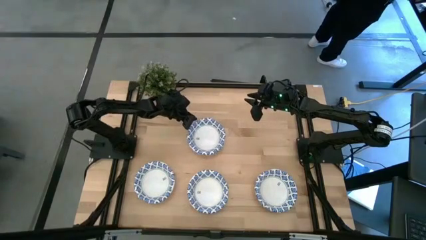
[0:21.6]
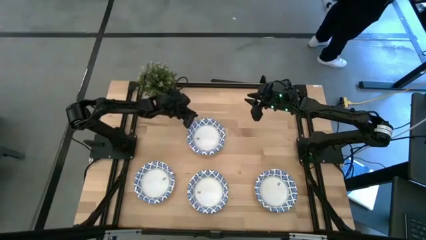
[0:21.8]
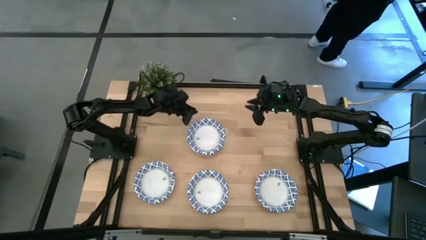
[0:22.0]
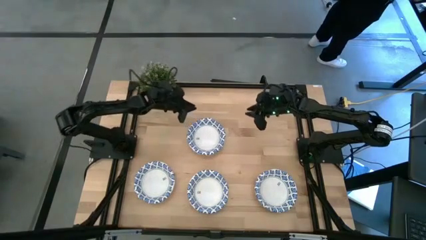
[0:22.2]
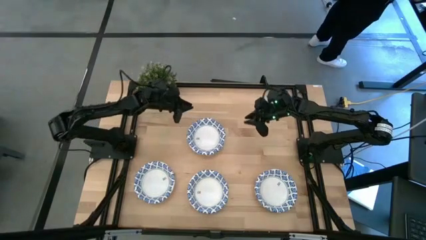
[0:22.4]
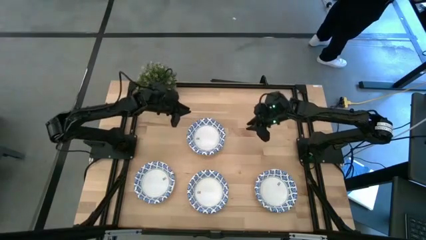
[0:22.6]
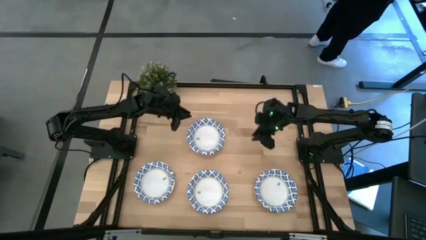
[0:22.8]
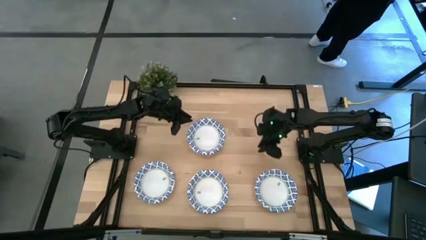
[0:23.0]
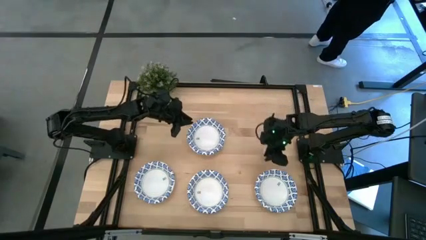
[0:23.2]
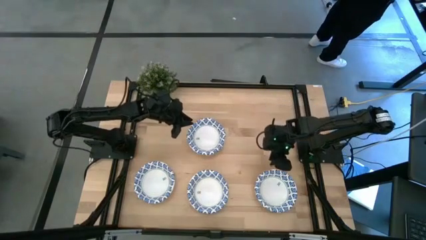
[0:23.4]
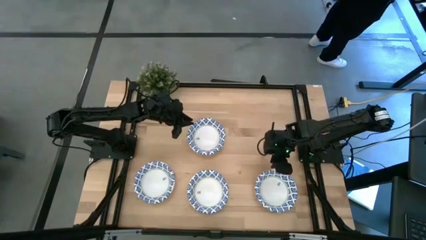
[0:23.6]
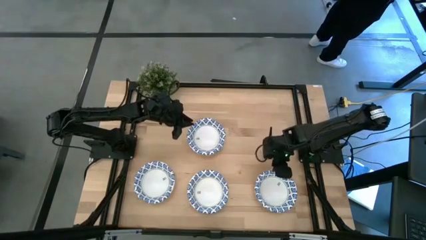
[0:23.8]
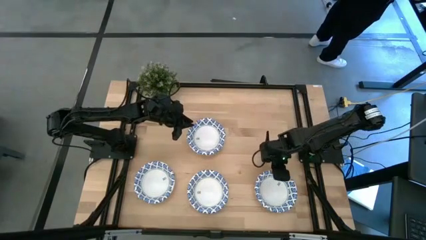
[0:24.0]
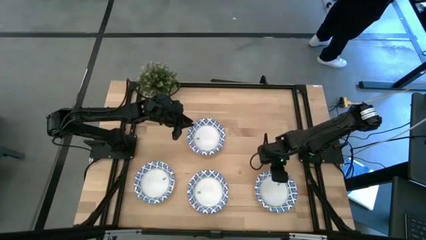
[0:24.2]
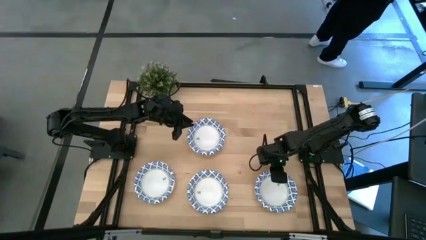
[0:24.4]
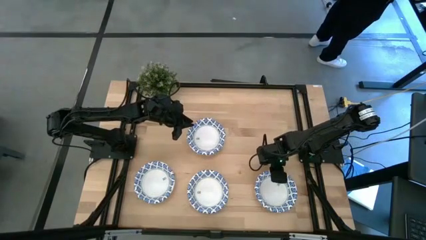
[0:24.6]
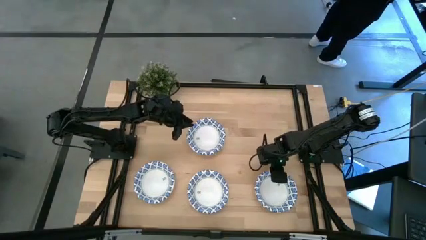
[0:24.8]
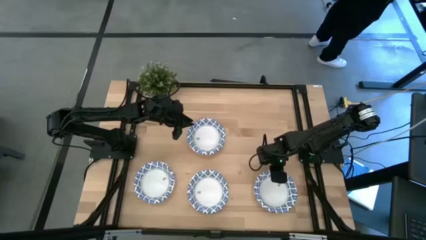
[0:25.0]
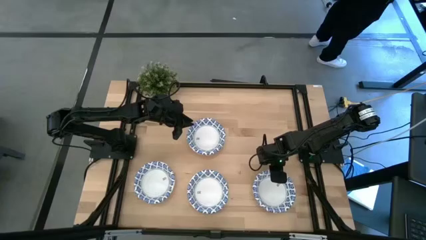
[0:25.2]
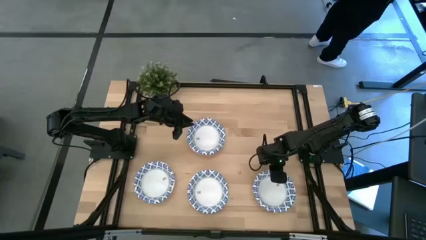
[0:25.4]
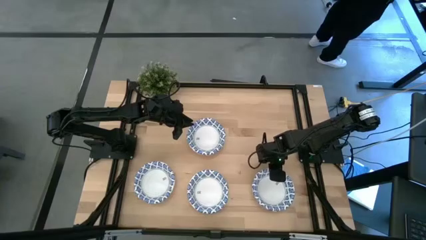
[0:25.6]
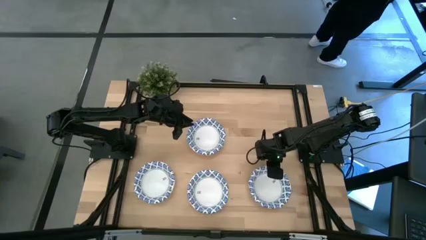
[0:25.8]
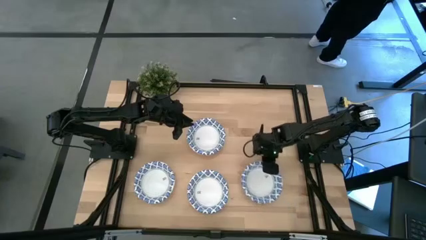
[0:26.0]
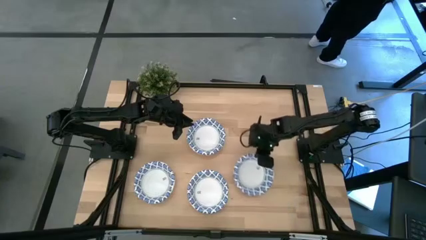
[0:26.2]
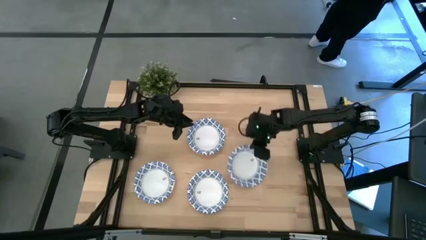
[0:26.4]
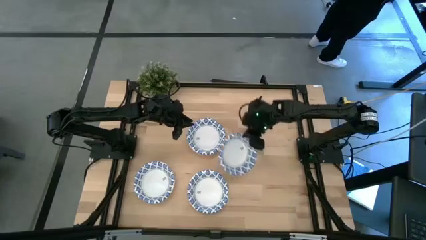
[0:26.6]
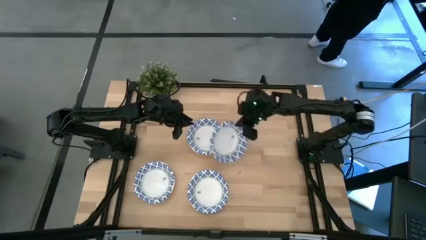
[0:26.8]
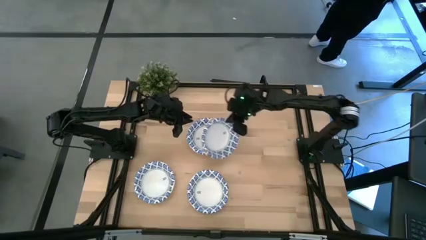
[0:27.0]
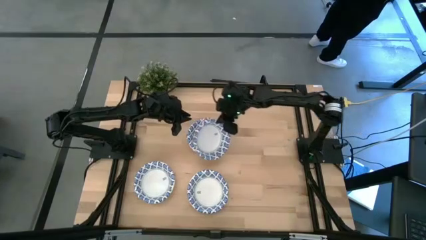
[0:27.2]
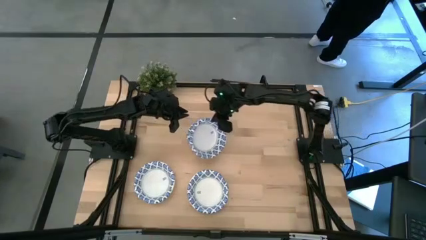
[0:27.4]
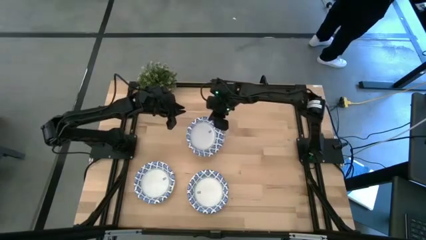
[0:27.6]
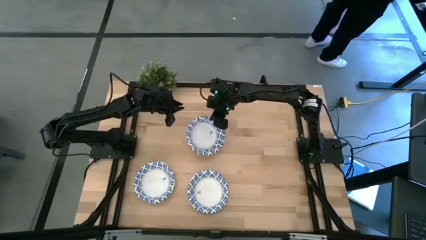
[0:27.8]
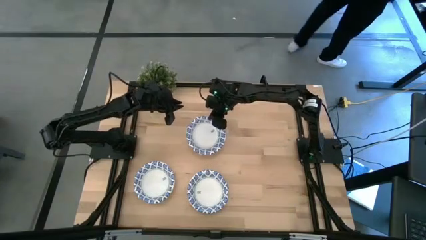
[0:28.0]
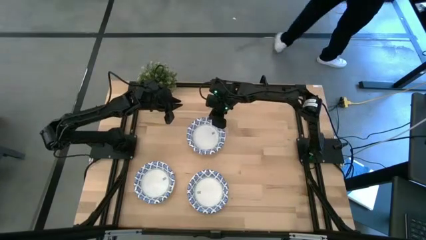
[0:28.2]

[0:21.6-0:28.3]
Task: Nest bowls inside each other
Stack the white patterned bowl on top of the top white patterned bowl

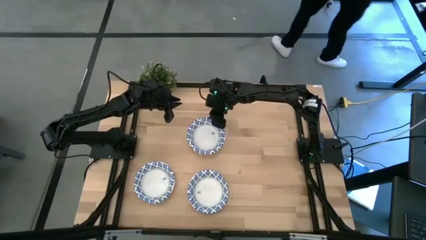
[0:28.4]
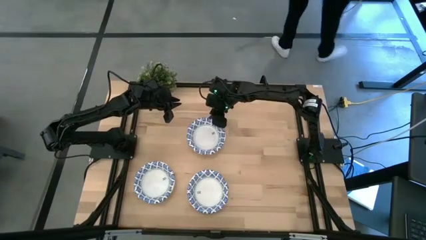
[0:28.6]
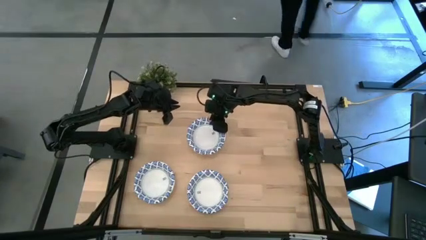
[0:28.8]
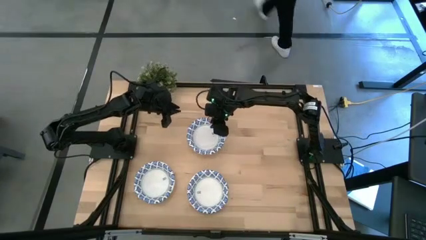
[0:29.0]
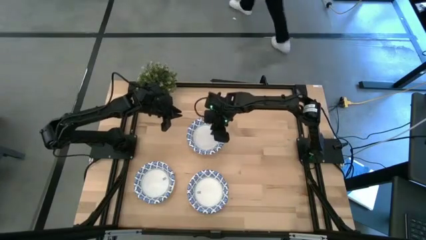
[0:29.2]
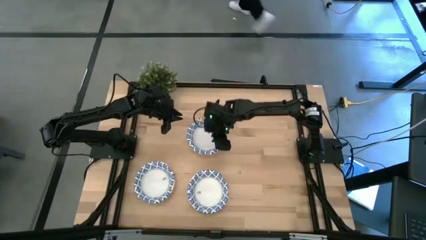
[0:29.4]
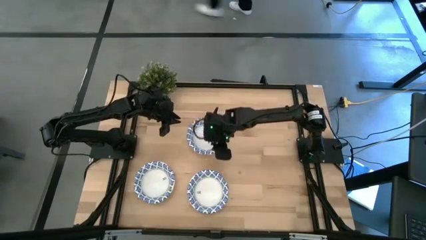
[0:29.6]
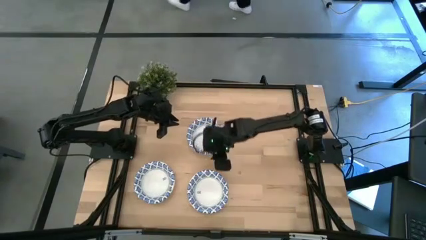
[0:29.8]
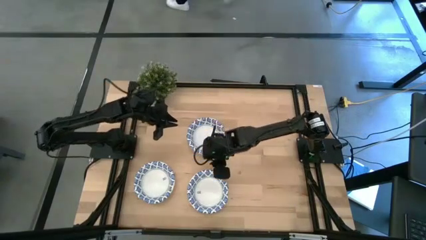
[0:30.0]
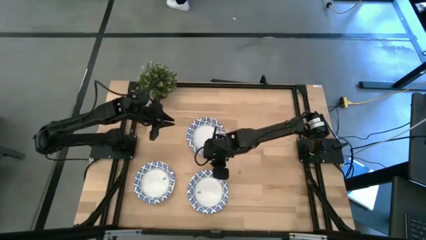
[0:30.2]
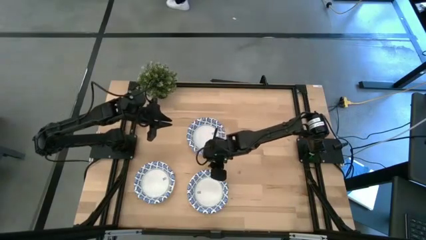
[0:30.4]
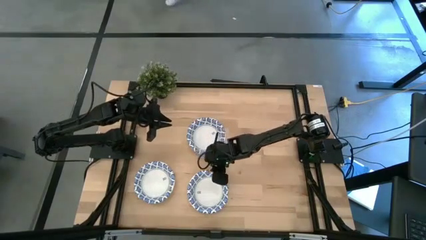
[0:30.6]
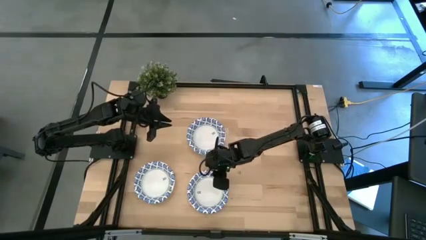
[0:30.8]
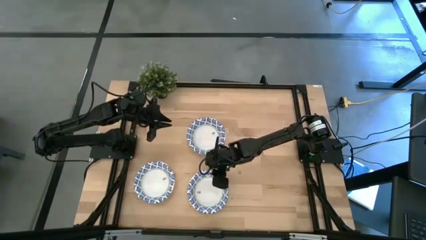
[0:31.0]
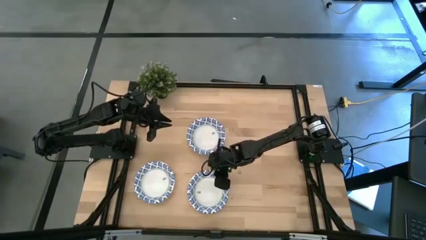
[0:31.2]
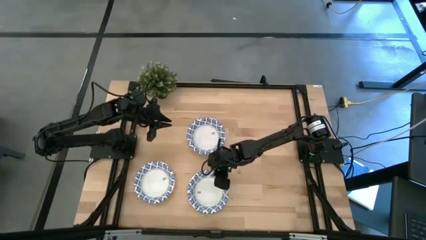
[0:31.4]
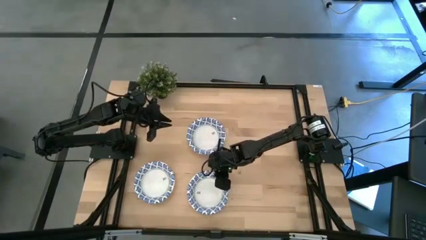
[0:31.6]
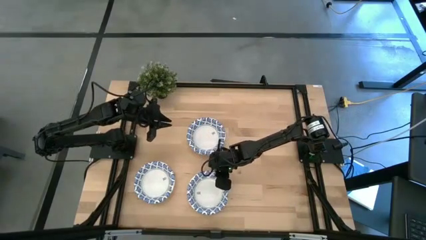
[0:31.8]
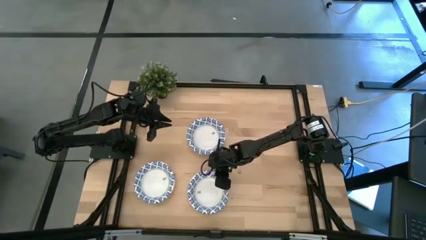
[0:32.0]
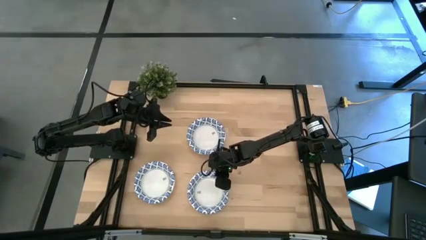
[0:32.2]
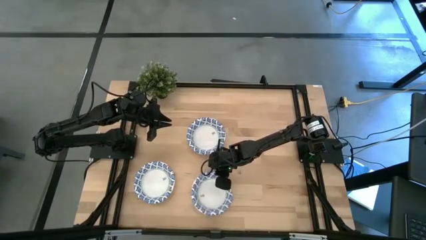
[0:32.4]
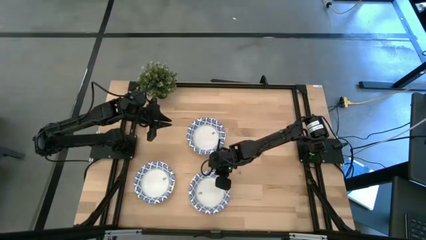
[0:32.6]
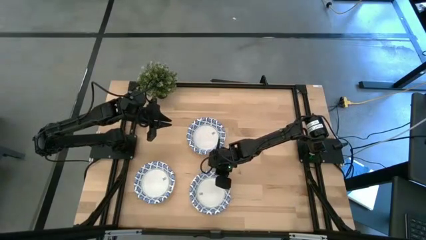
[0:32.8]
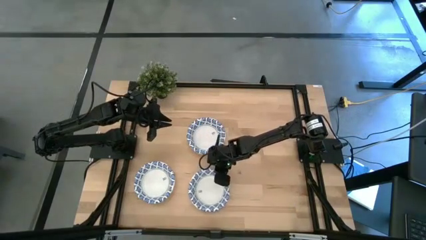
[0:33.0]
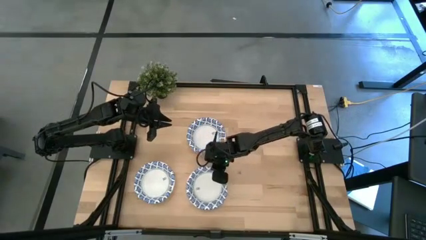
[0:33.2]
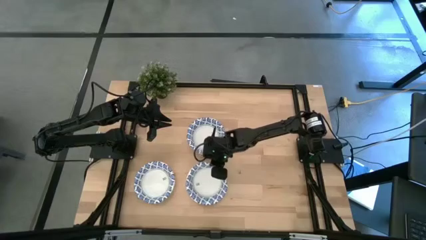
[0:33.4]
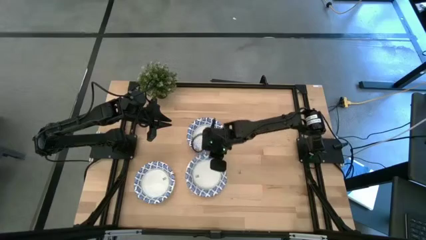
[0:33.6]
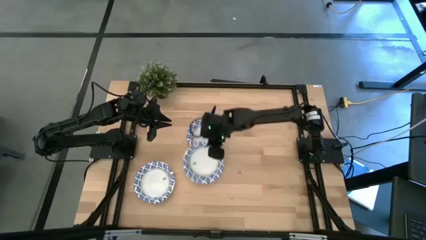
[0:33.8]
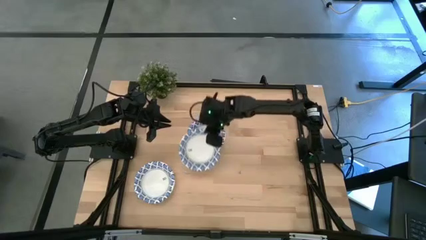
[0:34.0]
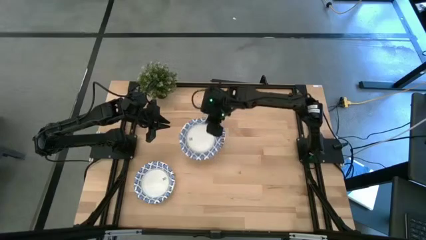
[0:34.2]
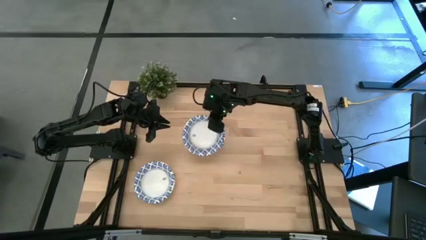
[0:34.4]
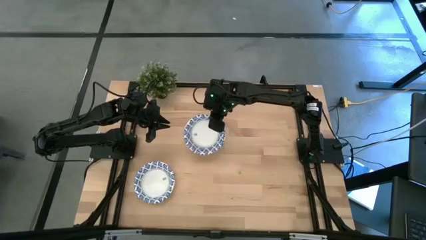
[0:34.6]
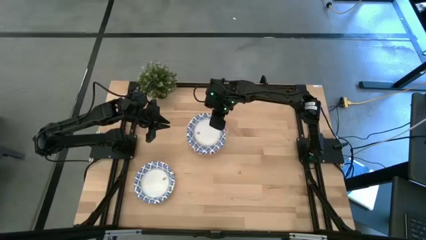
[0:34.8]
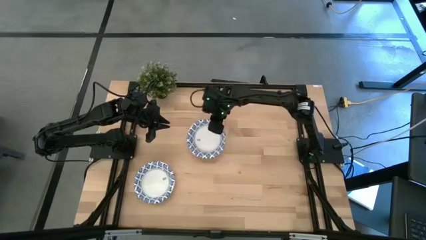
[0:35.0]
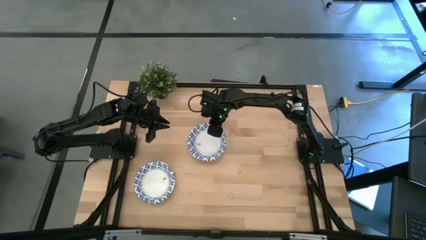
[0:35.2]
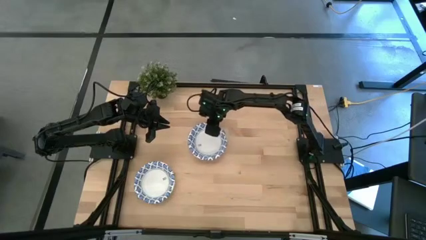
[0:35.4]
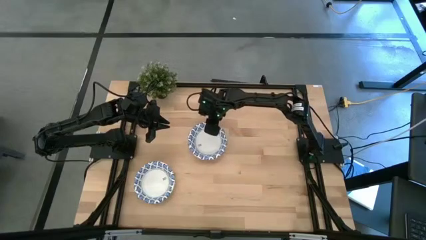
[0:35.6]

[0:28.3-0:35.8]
Stack the white patterned bowl on top of the top white patterned bowl

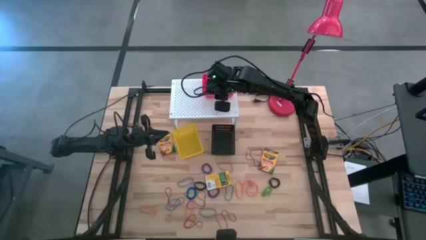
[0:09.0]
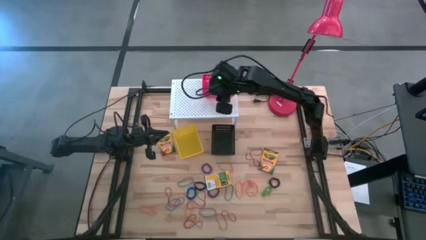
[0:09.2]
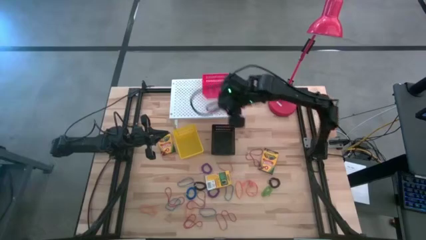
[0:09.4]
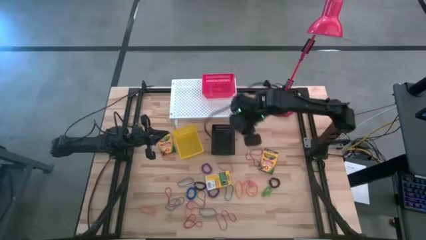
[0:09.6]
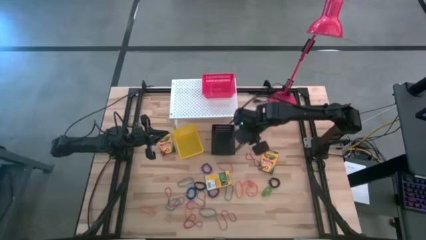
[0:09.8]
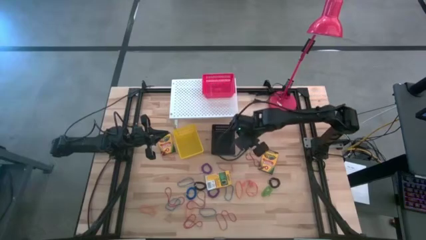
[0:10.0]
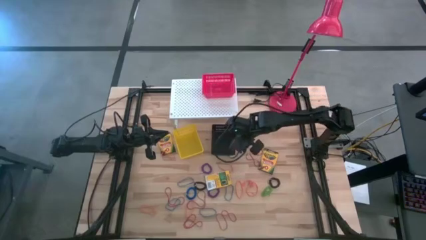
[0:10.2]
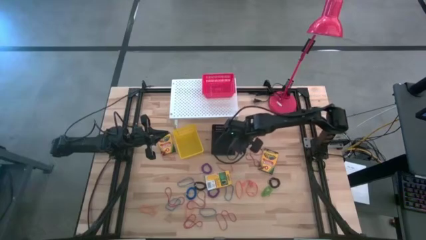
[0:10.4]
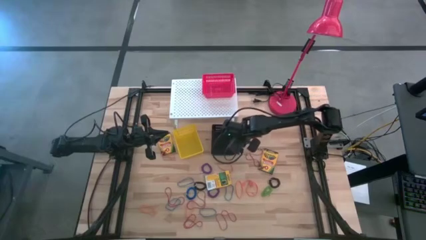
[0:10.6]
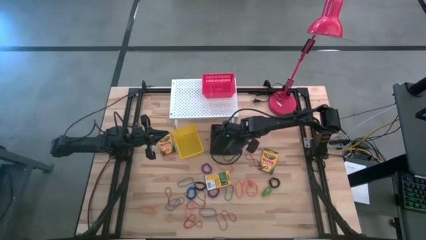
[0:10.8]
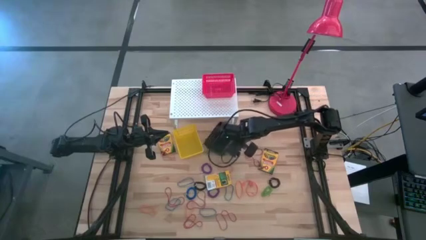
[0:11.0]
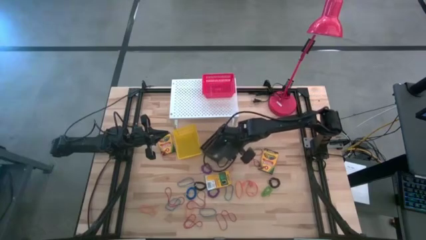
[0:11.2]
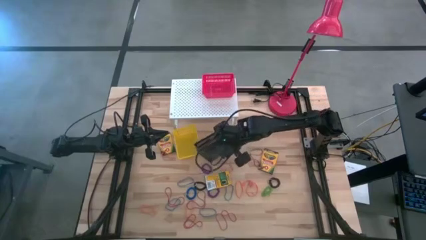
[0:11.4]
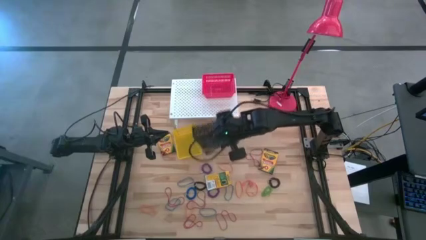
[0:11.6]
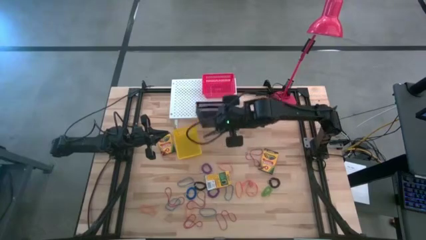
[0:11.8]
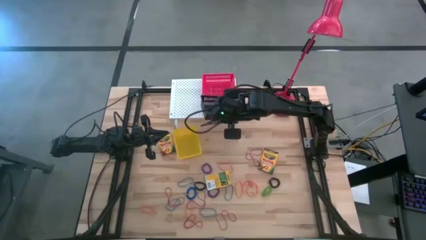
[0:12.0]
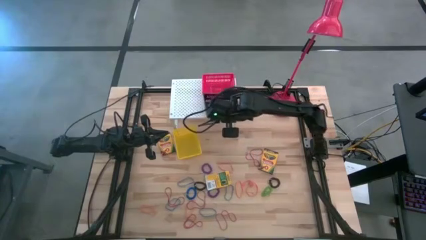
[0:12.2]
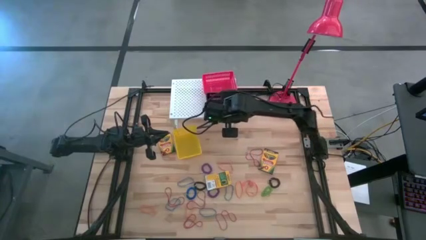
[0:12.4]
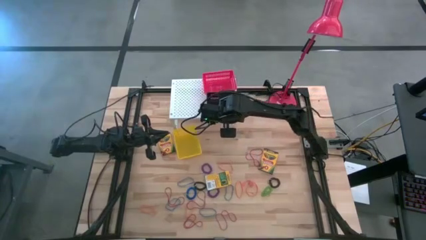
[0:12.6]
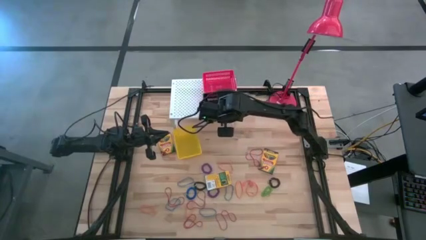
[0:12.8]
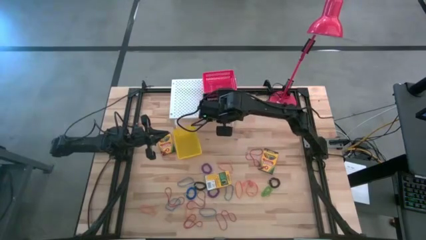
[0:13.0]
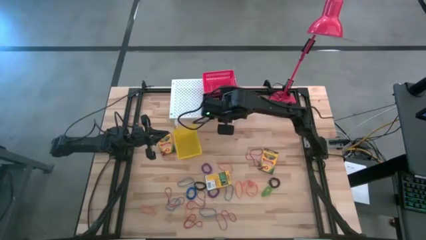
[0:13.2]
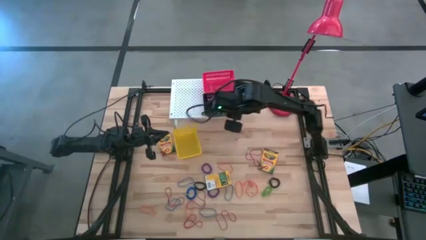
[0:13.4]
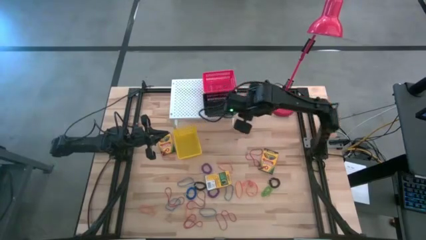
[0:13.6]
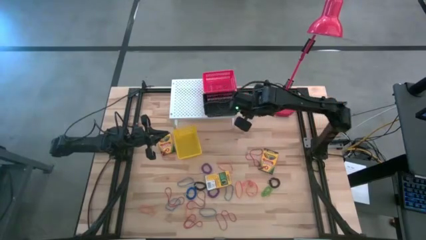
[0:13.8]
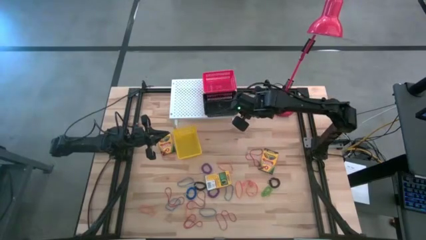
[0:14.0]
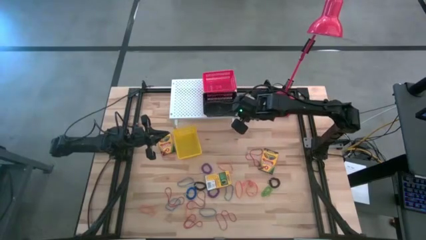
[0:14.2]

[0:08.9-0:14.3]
Task: Pick & Place Office Desk Supplies
Put the black bin on the shelf
